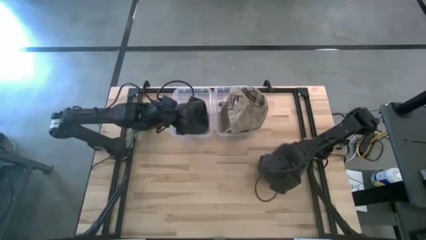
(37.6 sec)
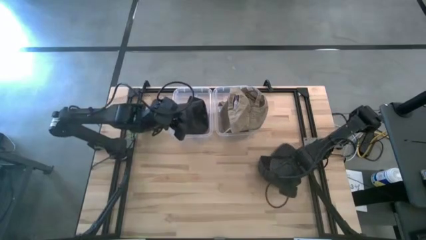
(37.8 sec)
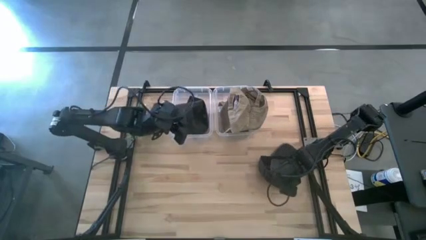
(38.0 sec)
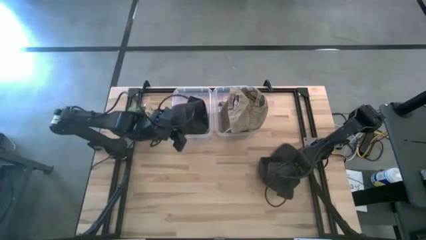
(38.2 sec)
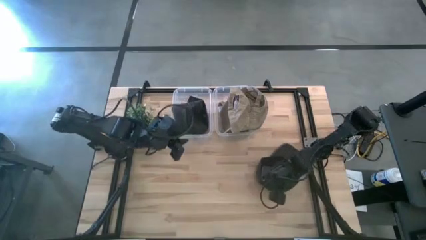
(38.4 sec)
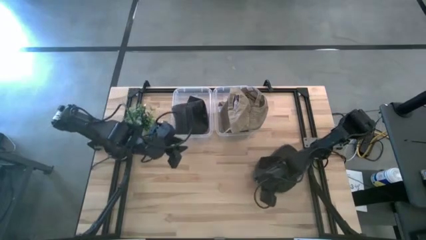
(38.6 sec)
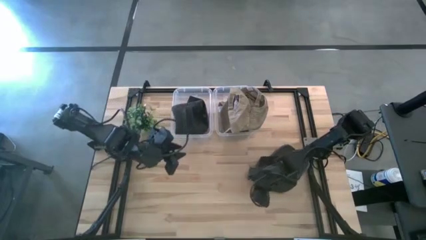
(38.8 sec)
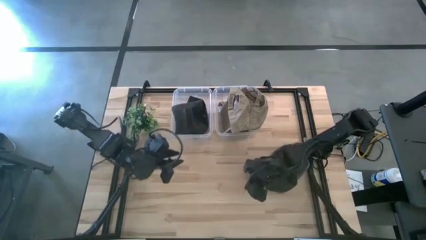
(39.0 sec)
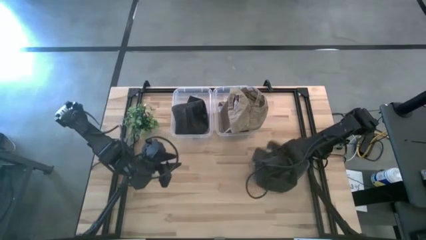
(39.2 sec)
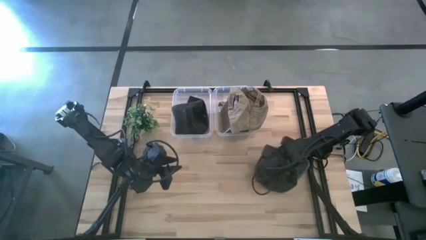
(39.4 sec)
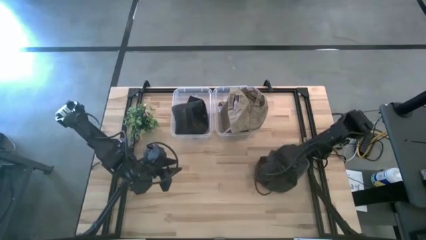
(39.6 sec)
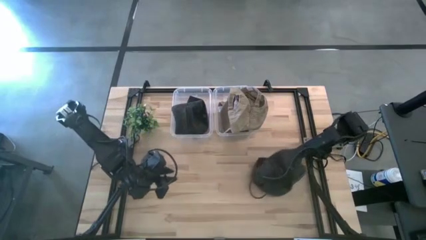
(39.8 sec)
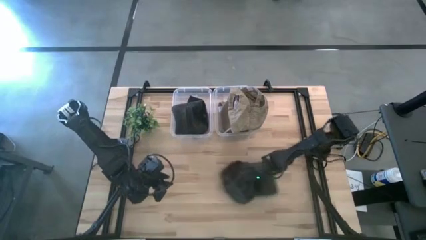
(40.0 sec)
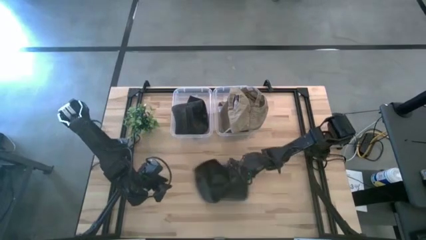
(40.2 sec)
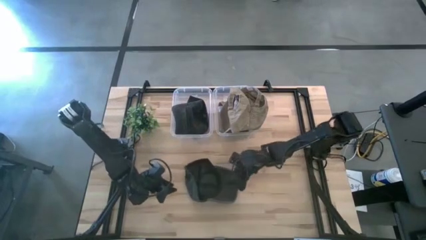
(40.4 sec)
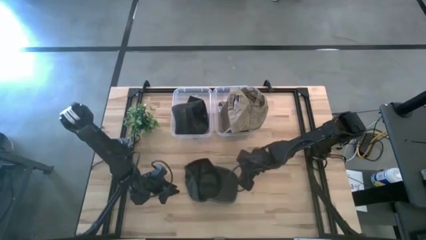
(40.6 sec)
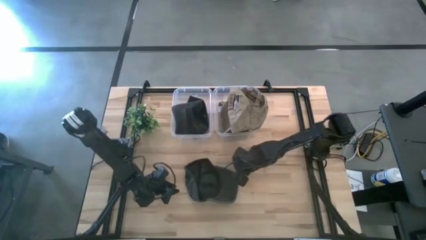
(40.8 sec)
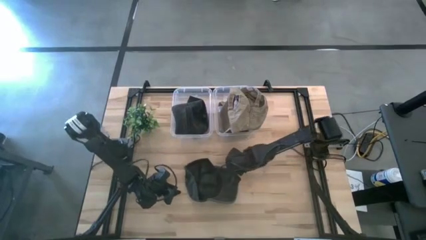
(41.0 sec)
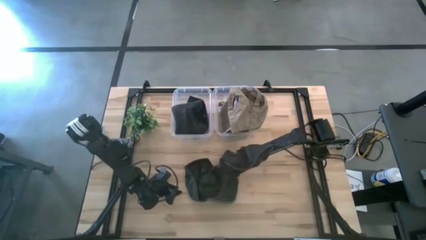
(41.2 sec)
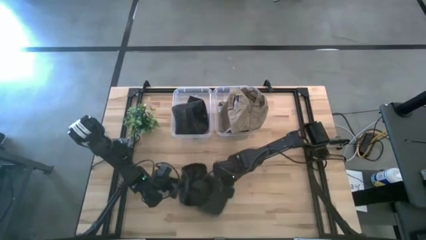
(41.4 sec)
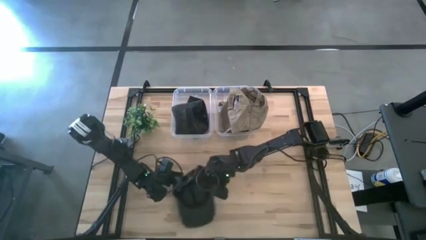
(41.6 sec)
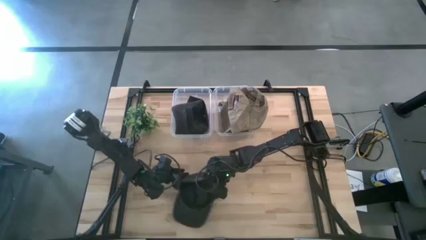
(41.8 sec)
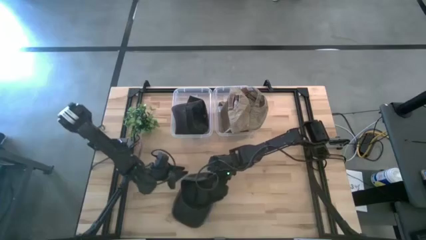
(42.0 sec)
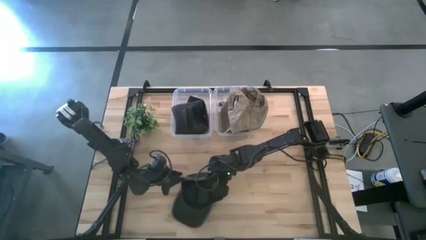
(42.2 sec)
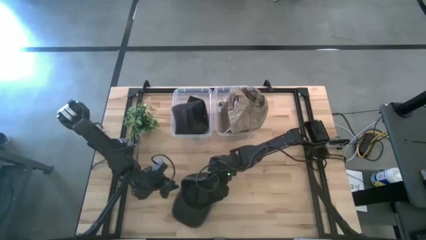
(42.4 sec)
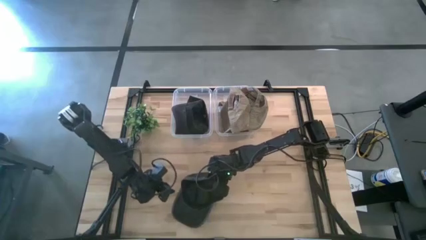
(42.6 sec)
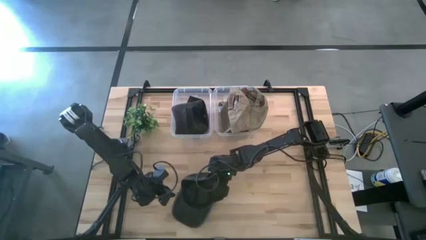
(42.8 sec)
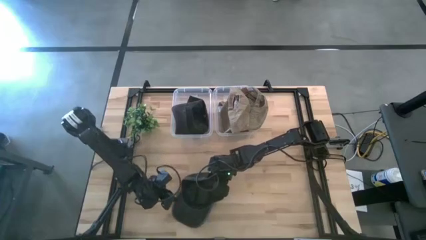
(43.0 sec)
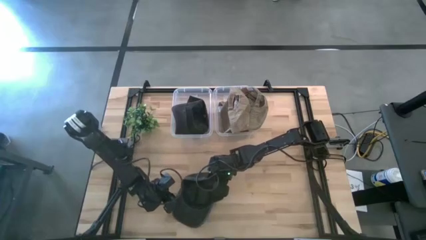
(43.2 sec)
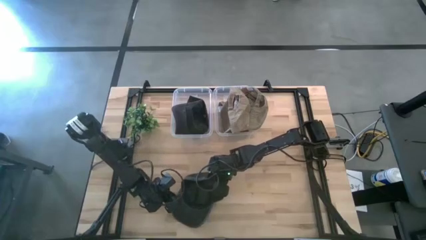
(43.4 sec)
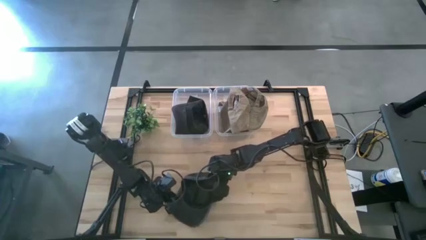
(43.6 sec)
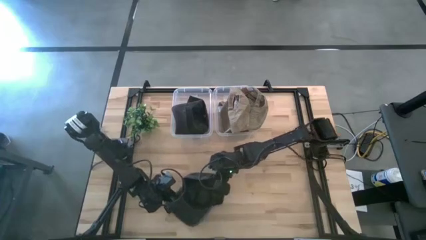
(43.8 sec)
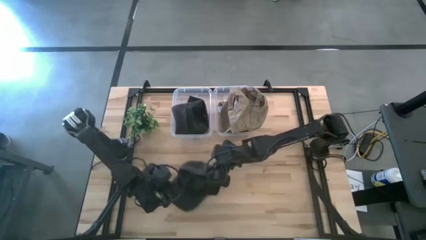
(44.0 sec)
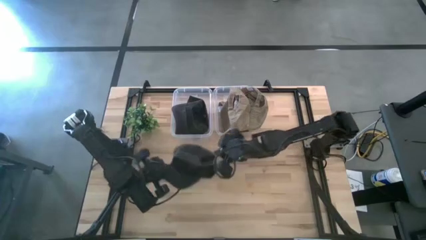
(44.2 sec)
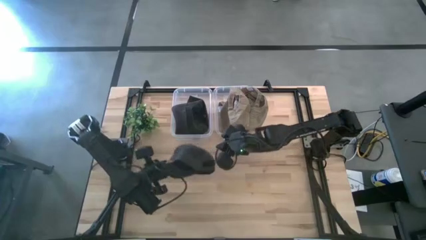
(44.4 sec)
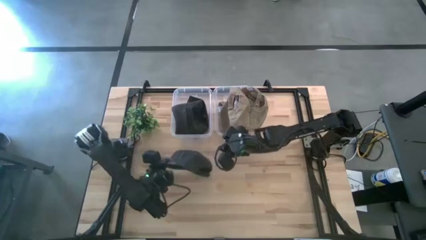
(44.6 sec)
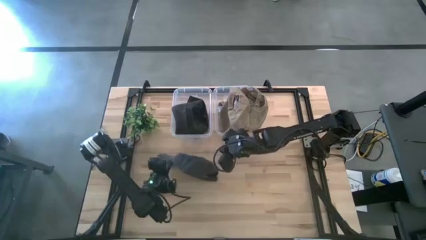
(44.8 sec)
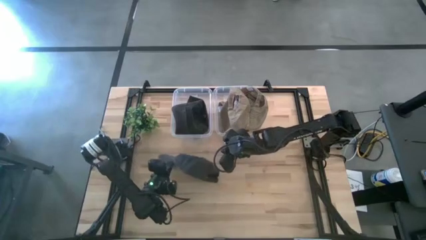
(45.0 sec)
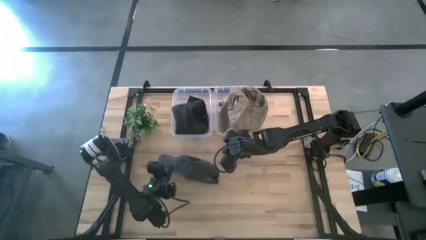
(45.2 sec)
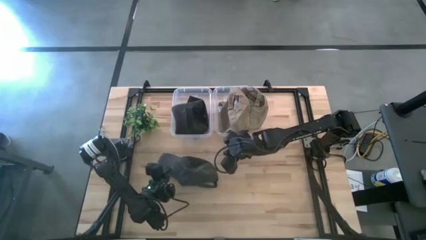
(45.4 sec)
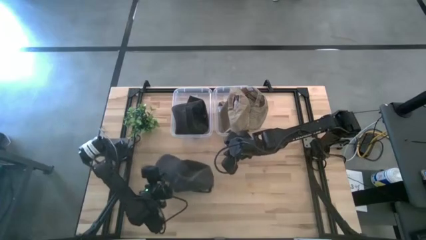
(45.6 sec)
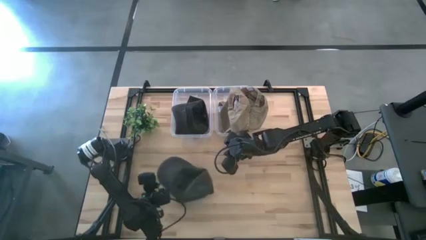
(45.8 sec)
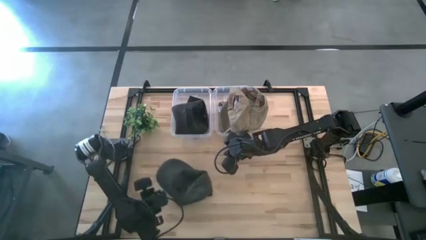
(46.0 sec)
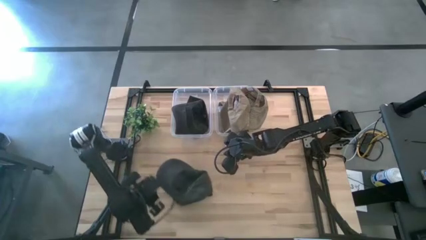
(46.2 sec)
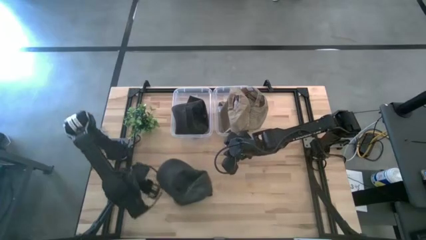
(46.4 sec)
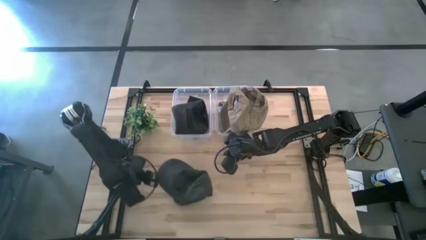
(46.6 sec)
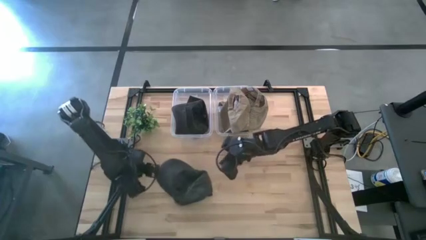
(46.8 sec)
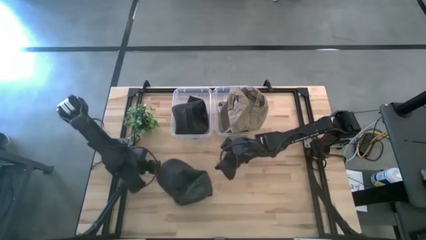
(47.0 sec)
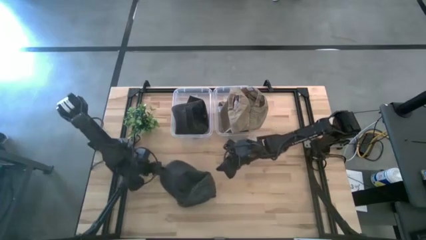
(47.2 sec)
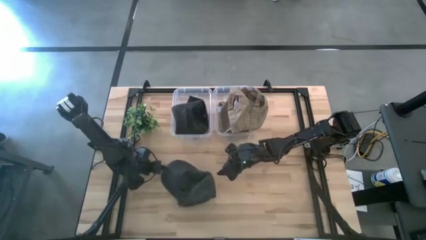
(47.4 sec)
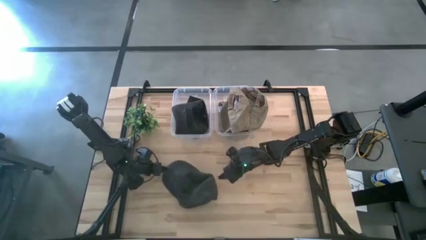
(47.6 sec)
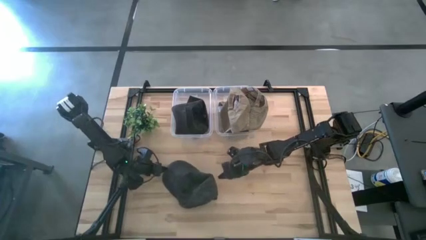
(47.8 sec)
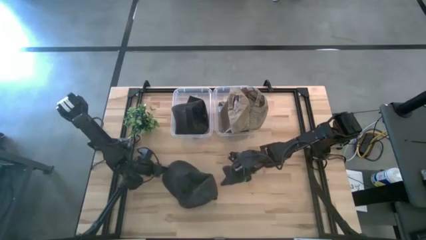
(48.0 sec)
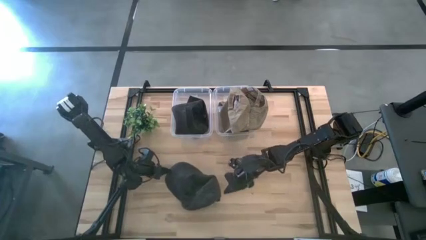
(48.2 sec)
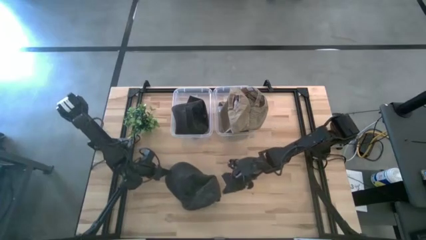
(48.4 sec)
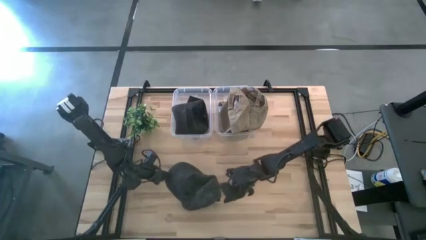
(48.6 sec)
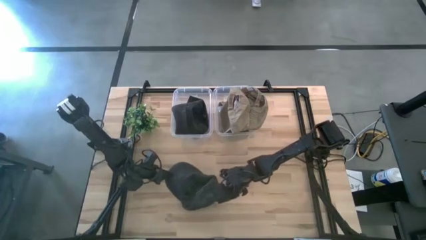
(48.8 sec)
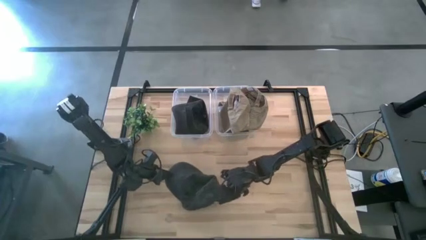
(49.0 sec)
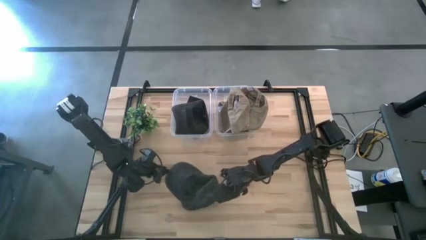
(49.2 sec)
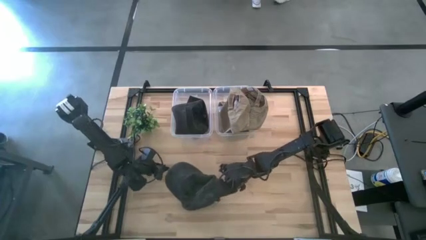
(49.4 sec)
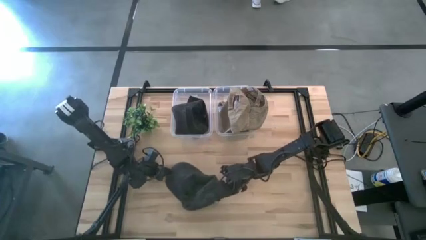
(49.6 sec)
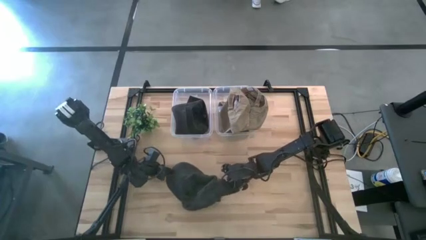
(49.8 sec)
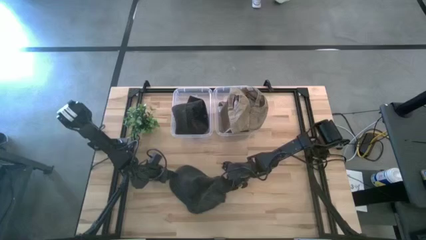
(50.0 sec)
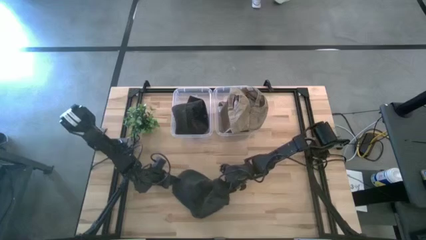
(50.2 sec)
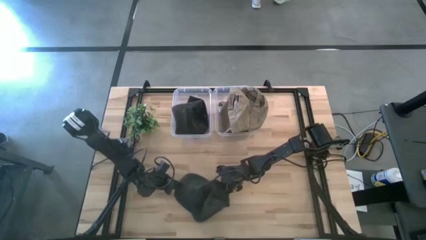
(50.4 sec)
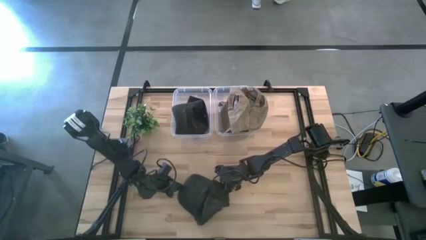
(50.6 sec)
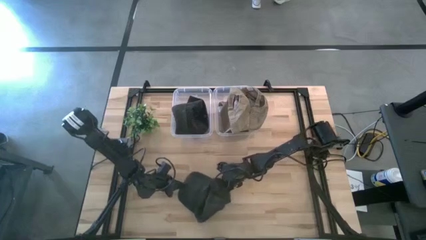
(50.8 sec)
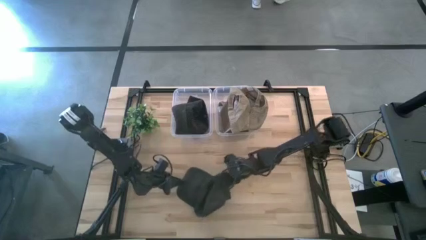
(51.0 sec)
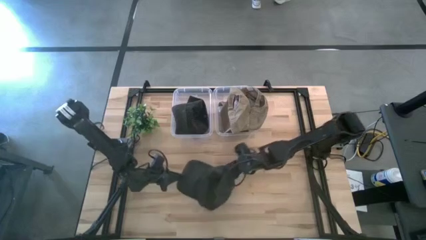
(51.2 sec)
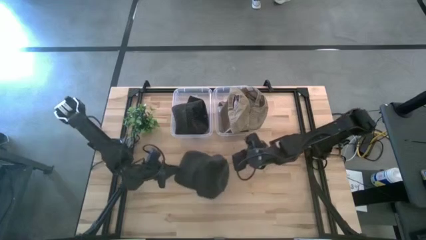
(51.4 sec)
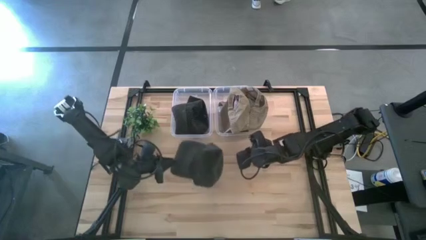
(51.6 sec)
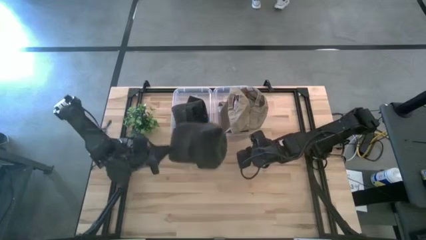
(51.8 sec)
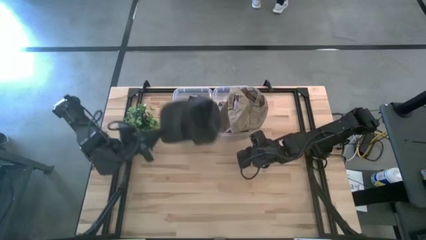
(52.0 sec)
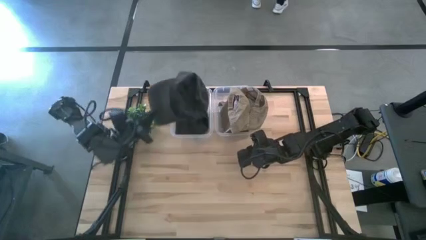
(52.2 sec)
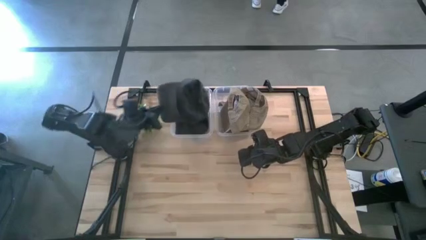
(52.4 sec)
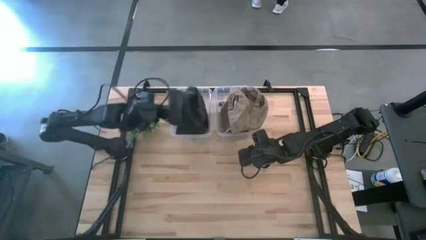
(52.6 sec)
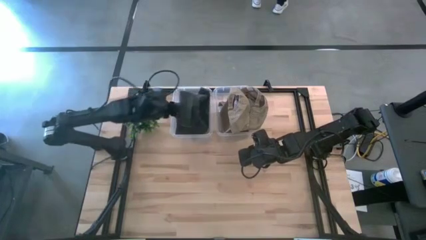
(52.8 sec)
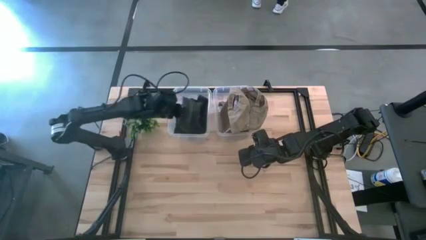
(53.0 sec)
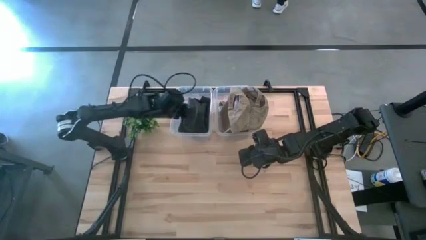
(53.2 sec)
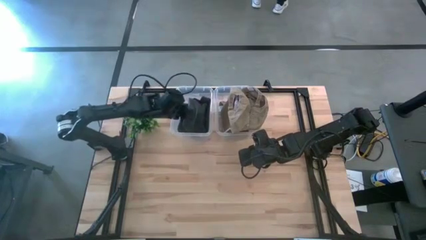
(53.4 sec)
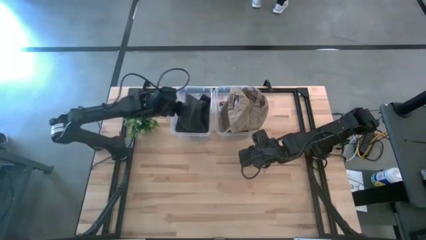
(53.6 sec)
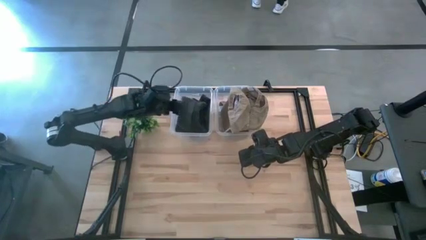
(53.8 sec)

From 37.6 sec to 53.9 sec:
Task: Pick & Place hat
Put the black cap into the left transparent bin
